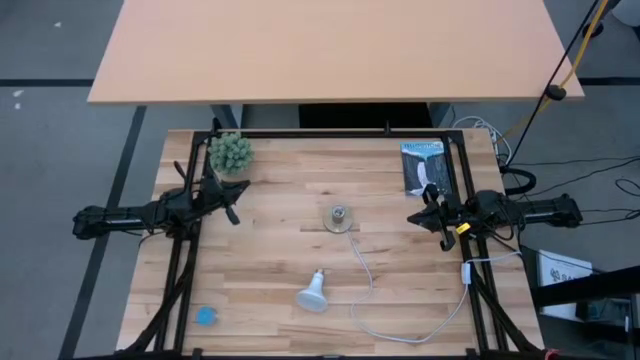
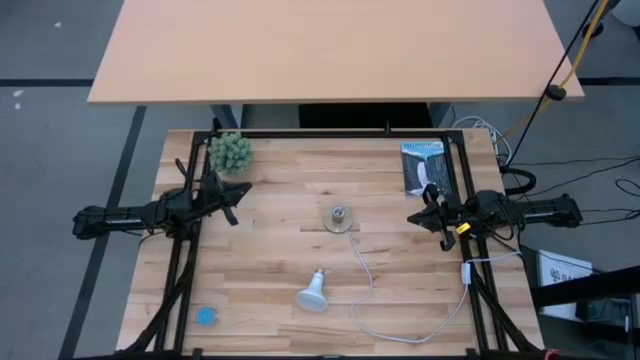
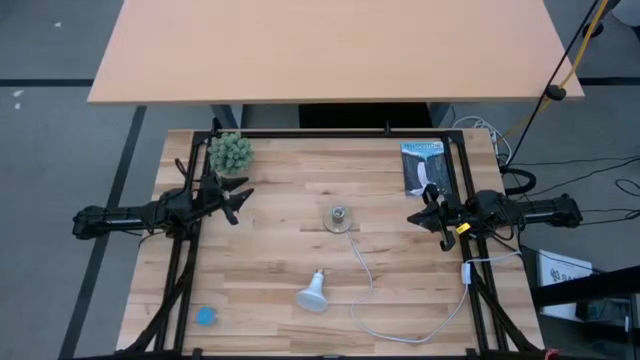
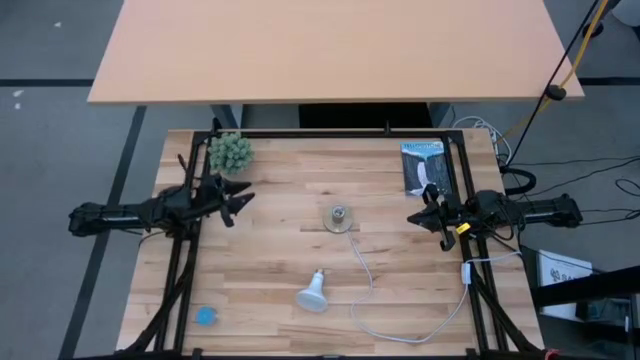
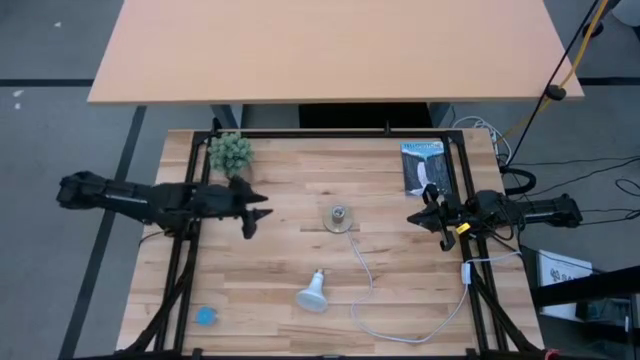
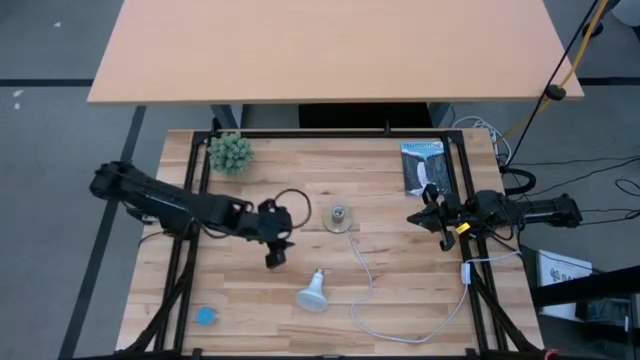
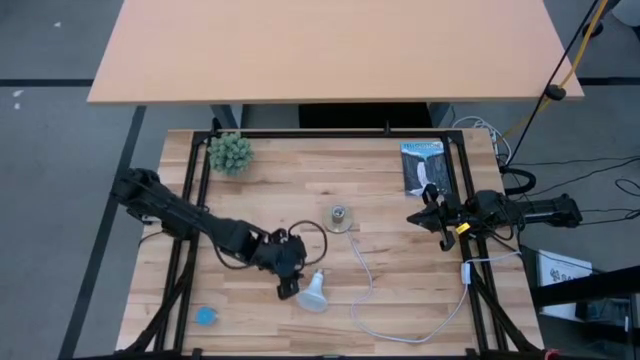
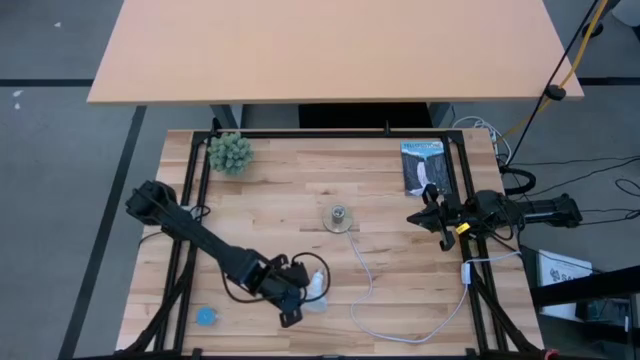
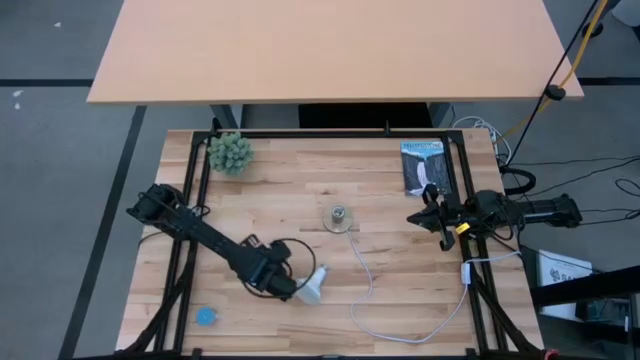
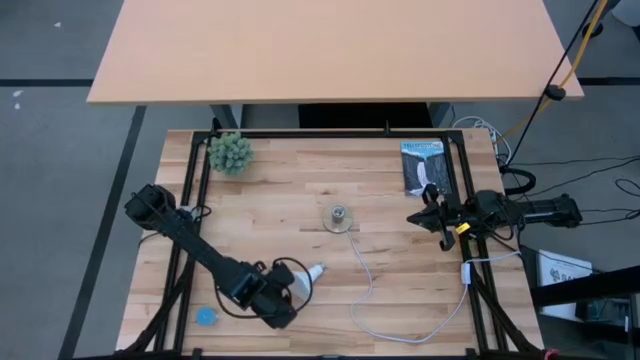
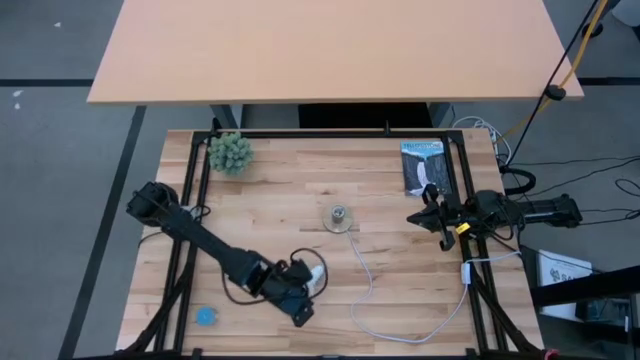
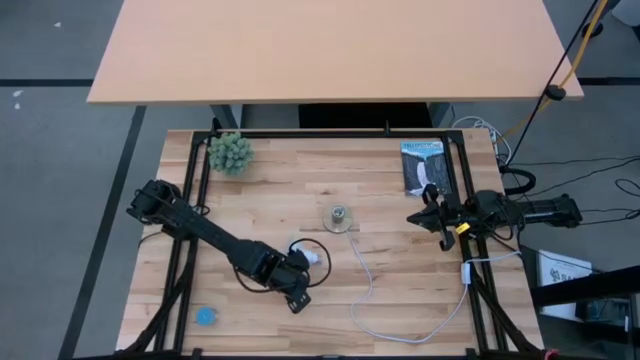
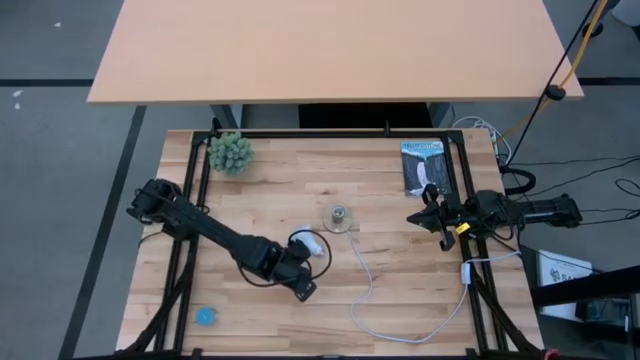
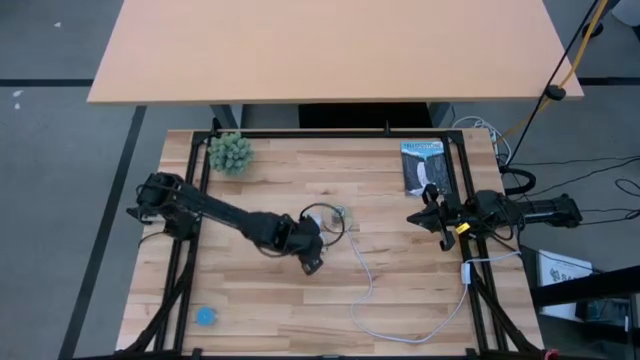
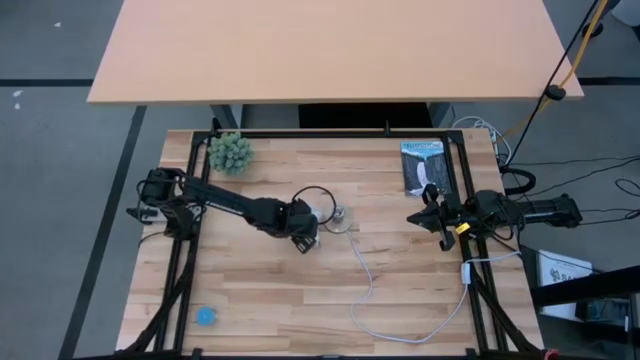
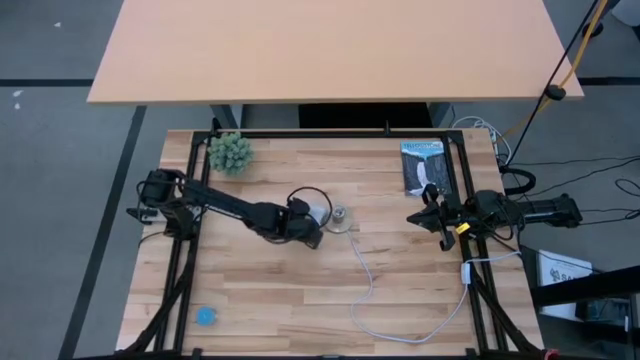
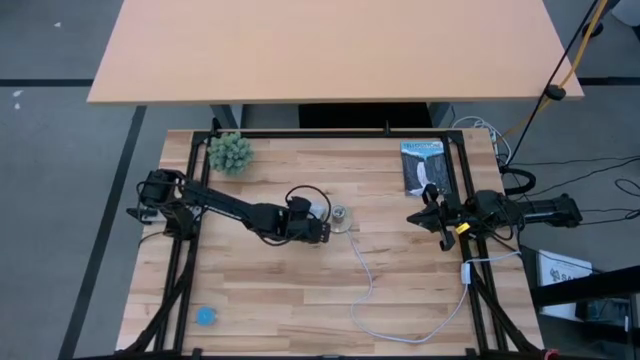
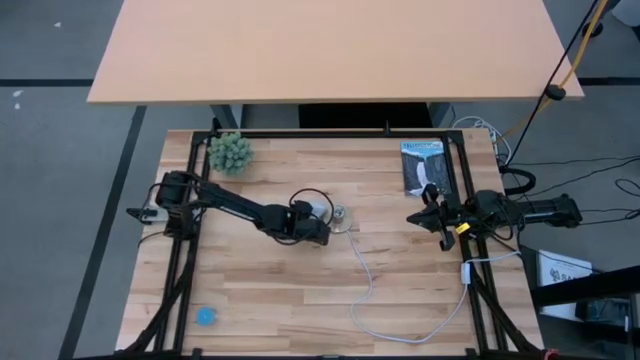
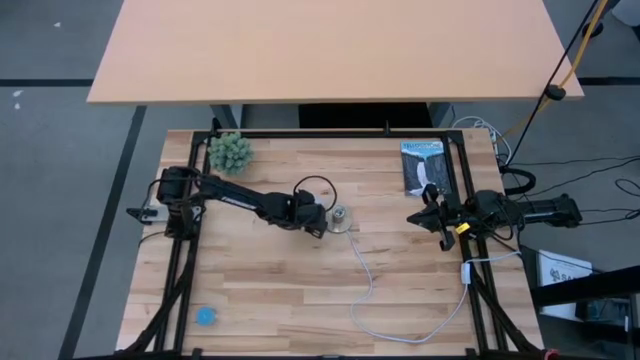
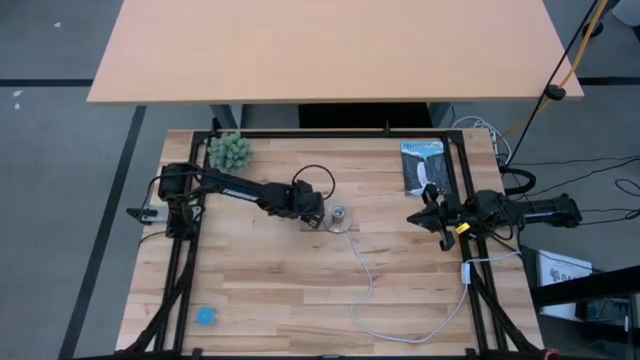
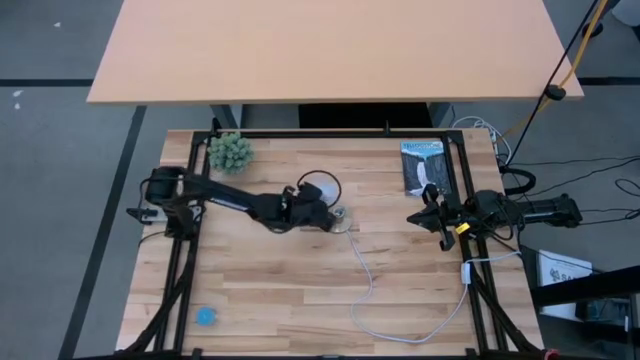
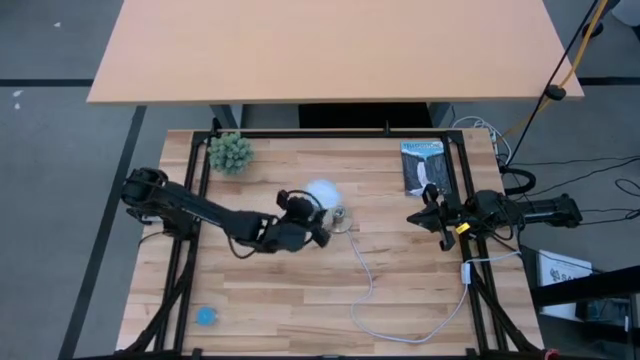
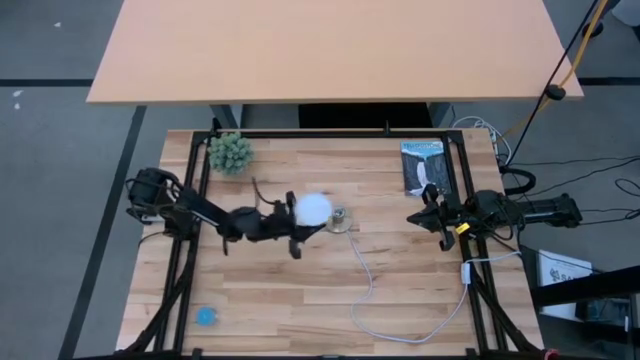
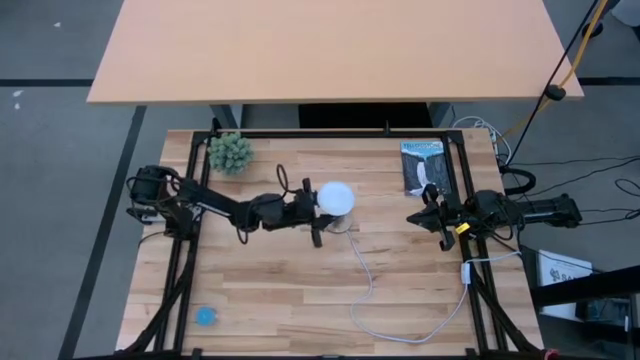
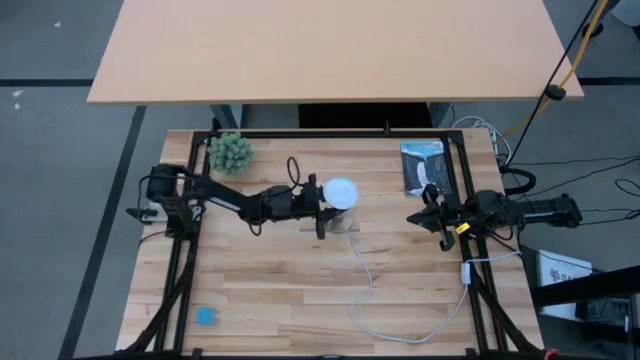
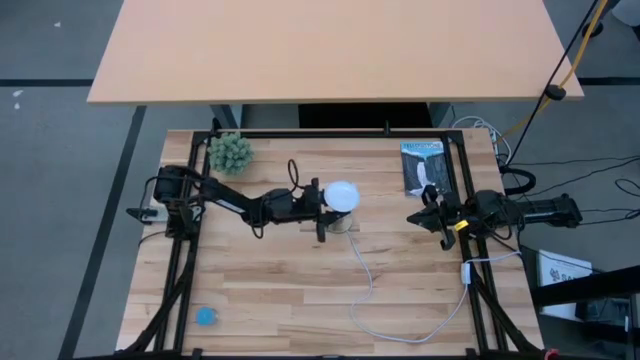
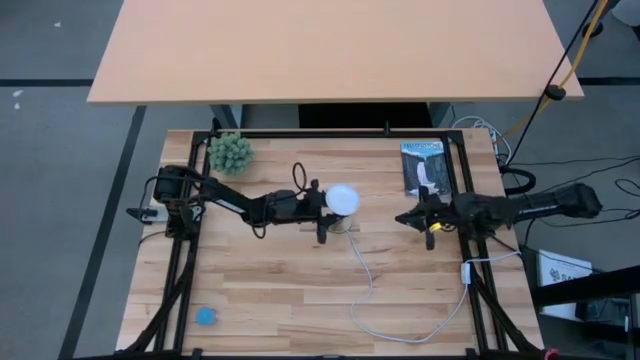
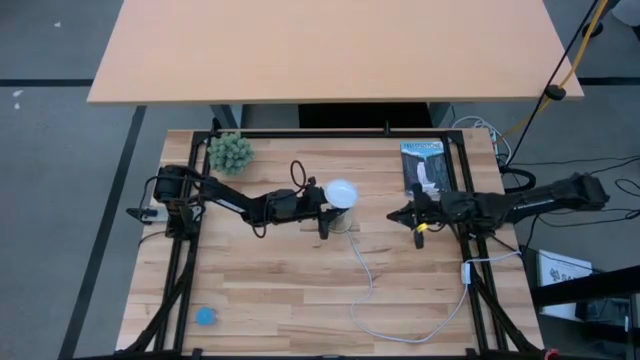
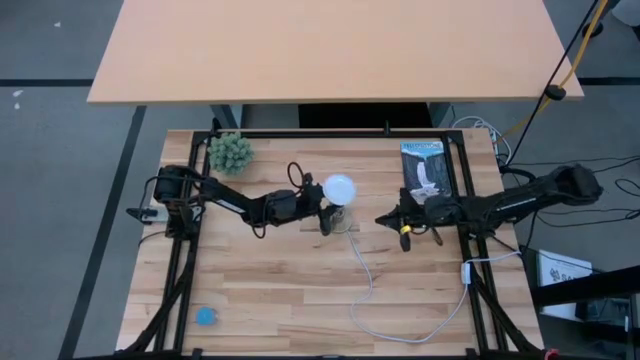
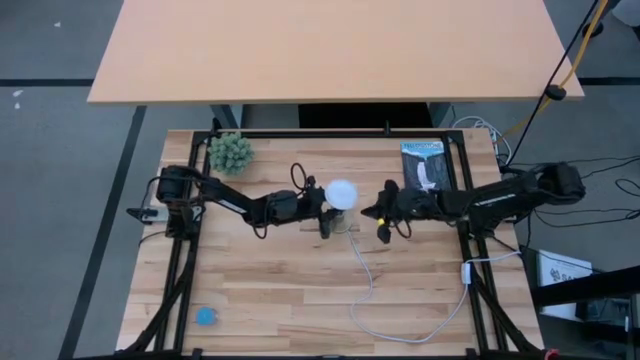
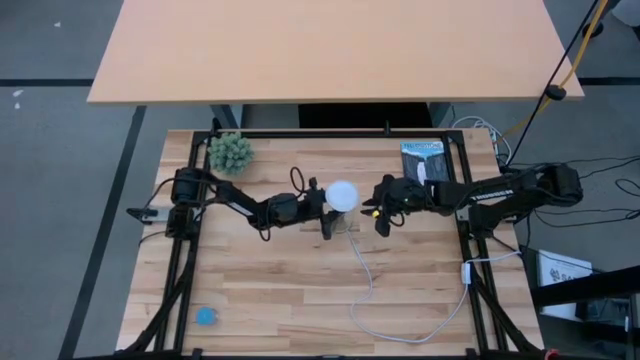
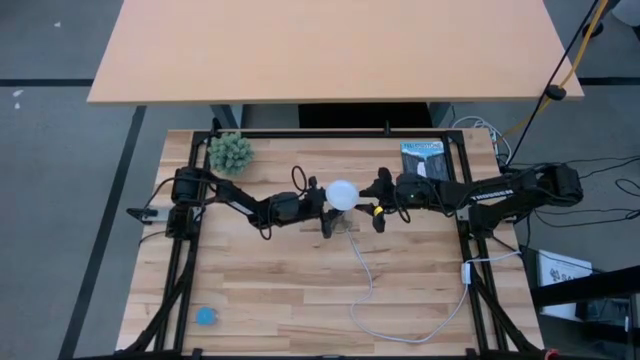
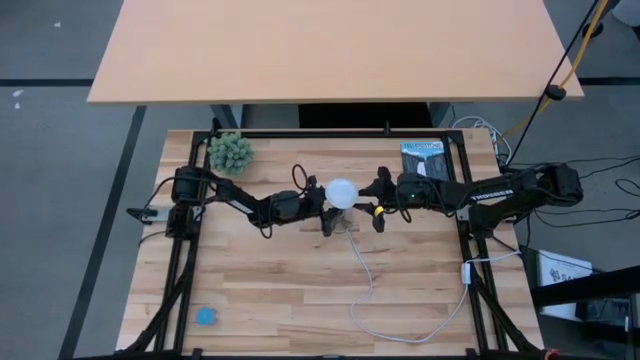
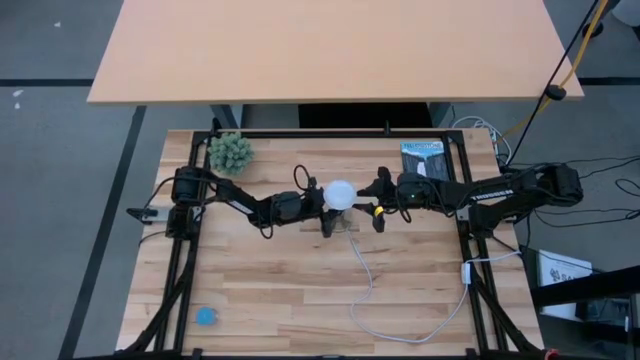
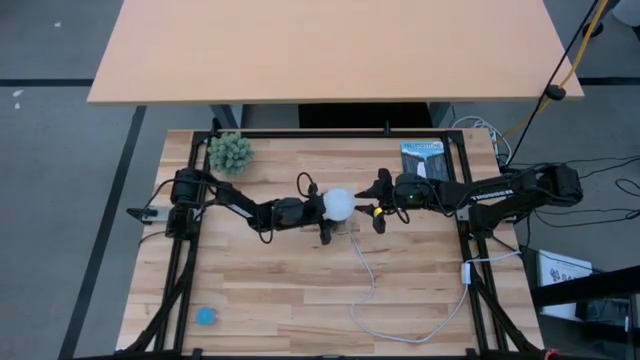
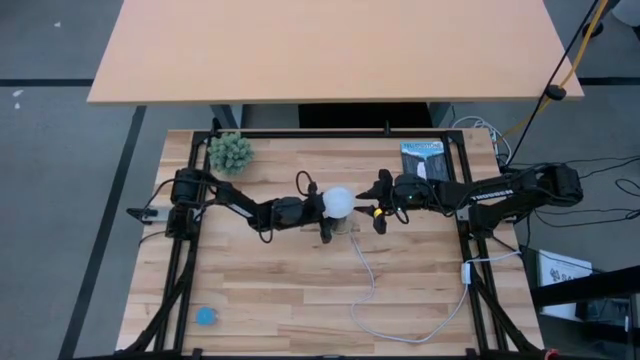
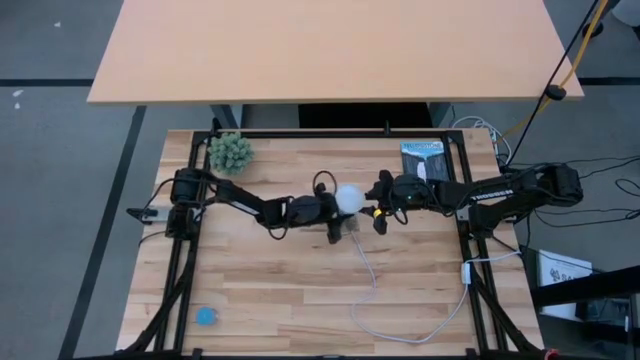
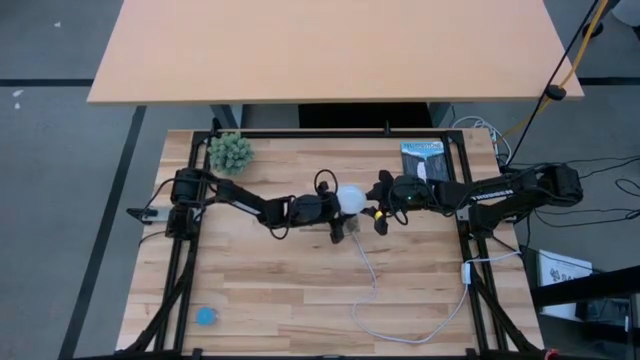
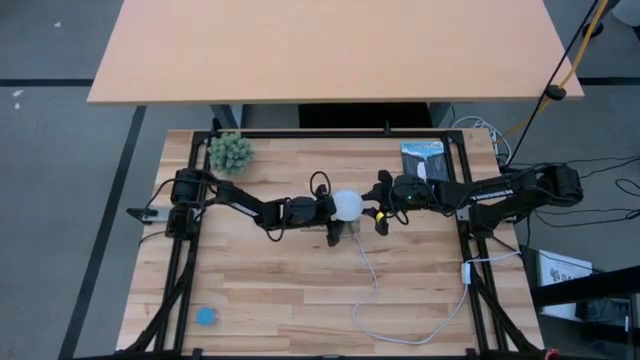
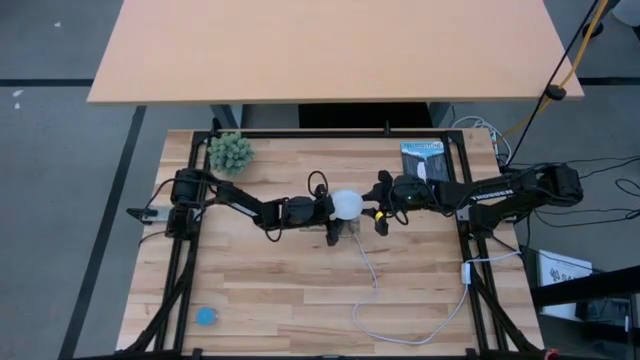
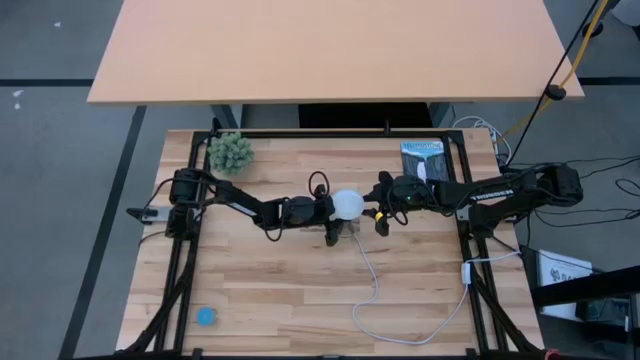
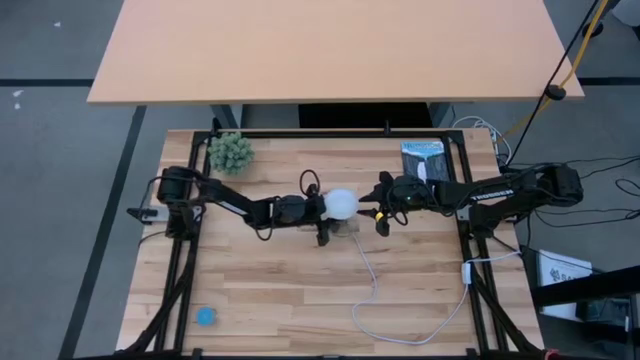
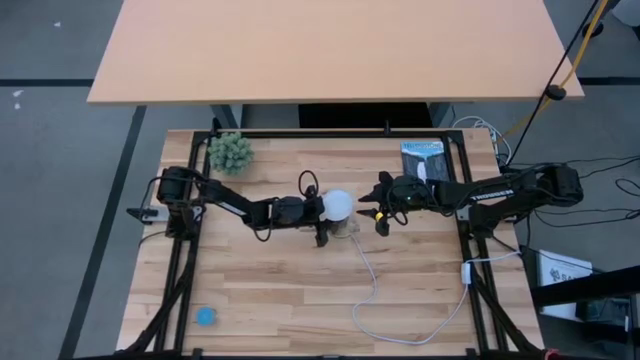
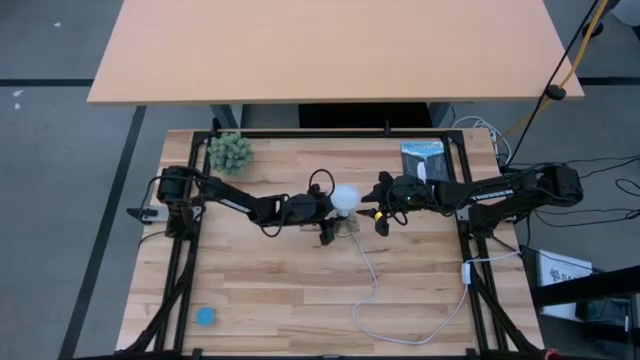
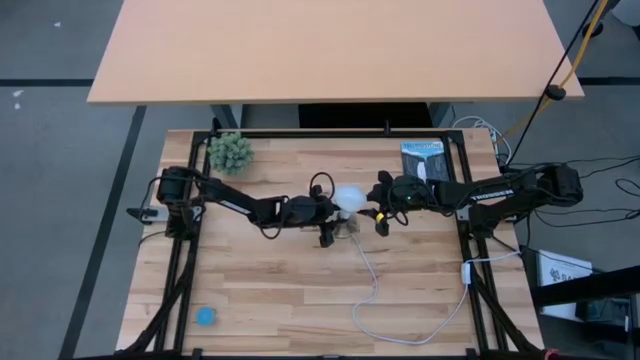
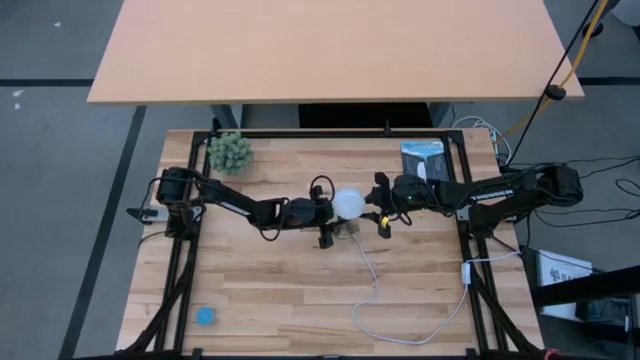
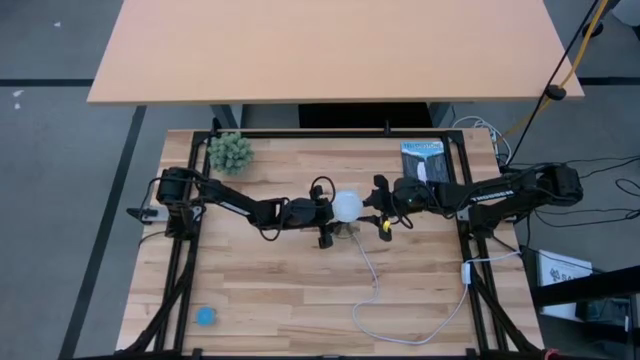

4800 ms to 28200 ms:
Task: Screw lightbulb
Insert the lightbulb into the lamp
